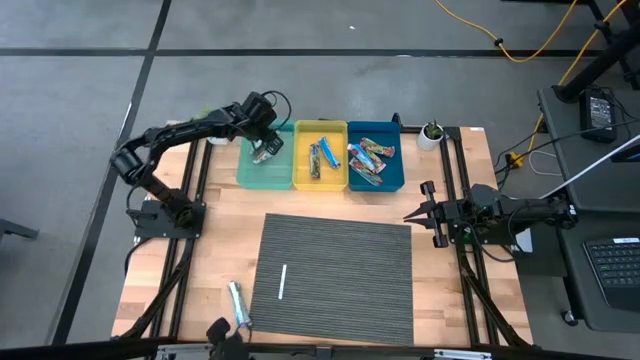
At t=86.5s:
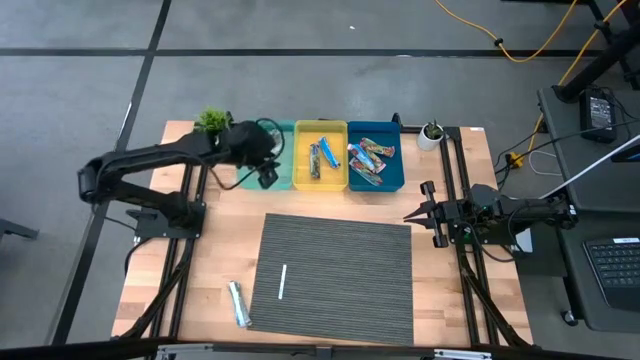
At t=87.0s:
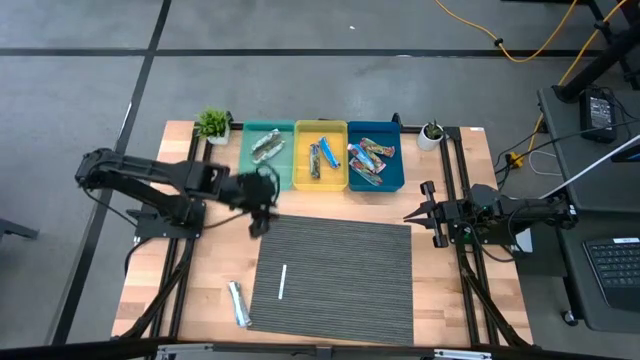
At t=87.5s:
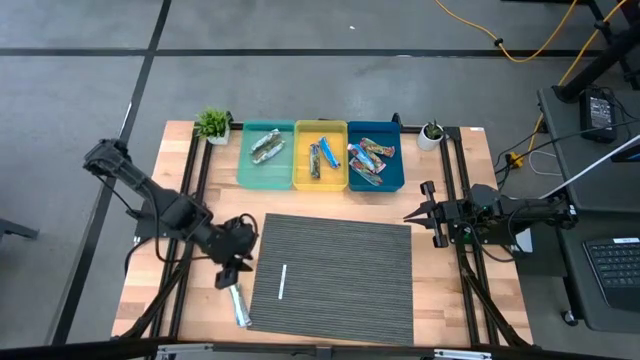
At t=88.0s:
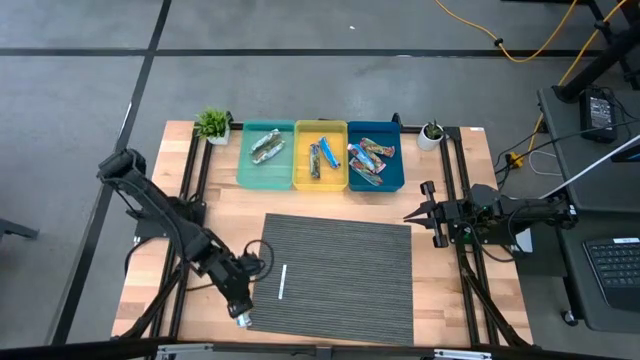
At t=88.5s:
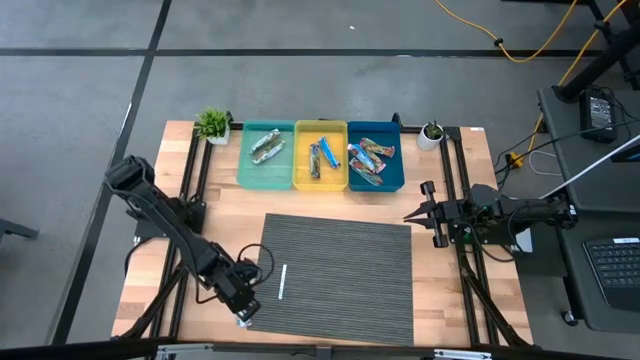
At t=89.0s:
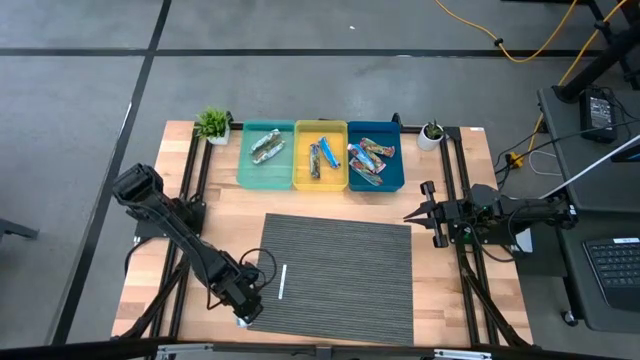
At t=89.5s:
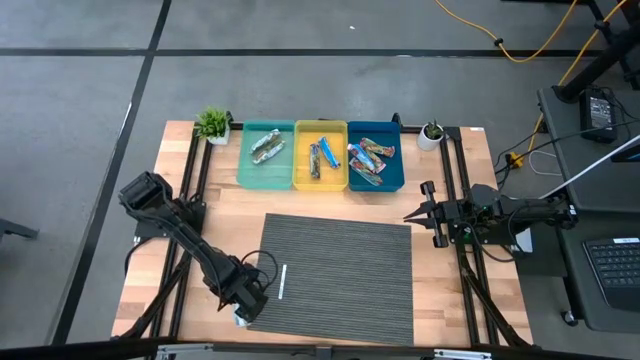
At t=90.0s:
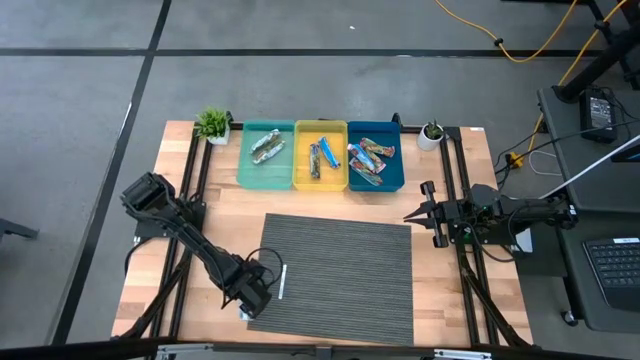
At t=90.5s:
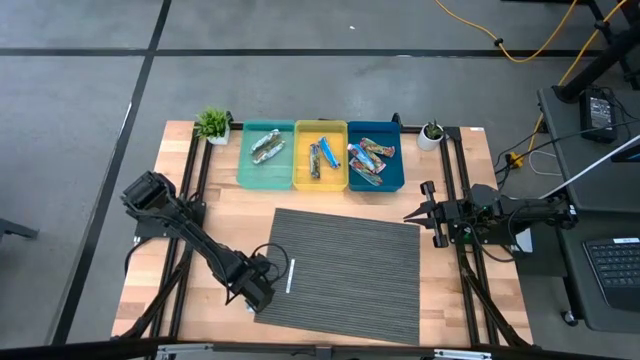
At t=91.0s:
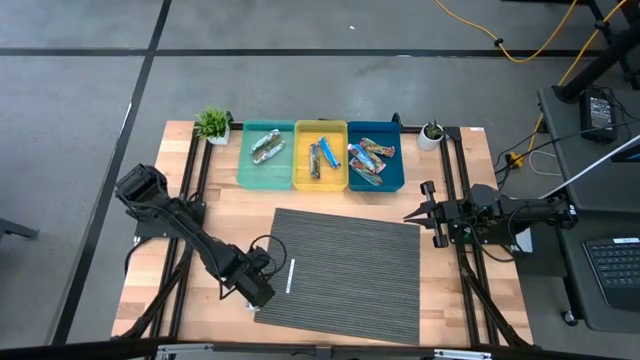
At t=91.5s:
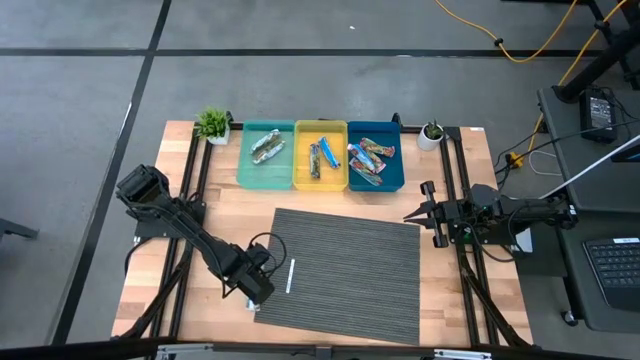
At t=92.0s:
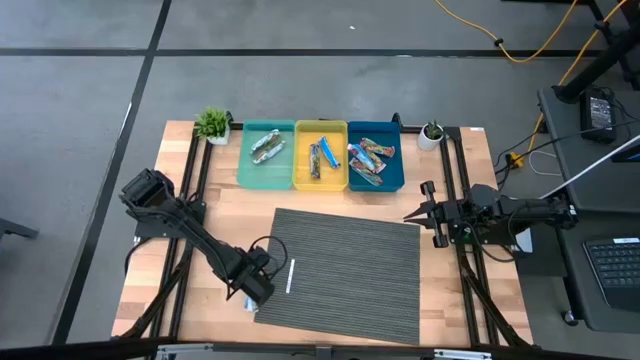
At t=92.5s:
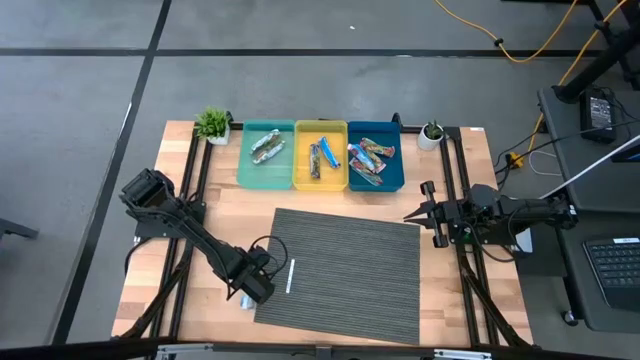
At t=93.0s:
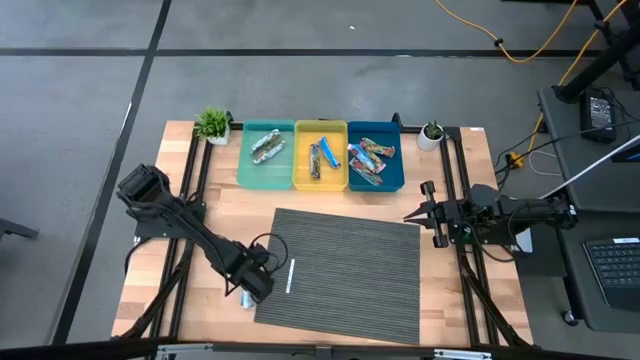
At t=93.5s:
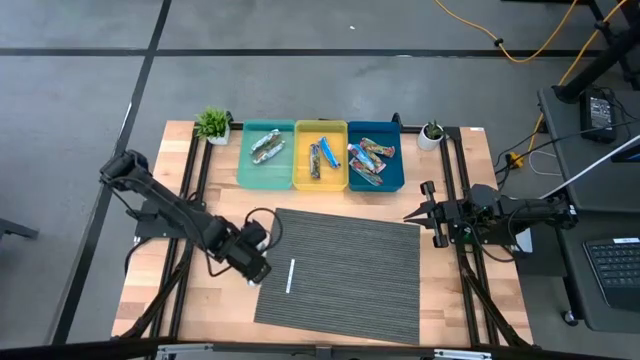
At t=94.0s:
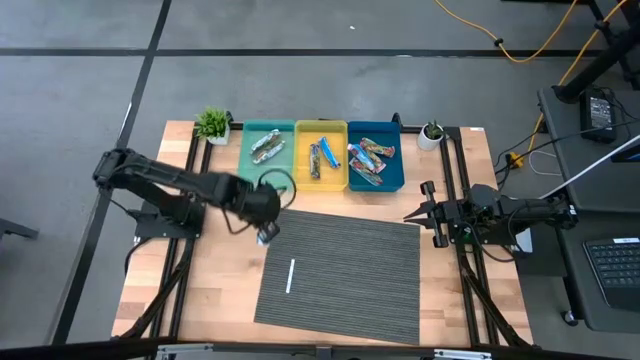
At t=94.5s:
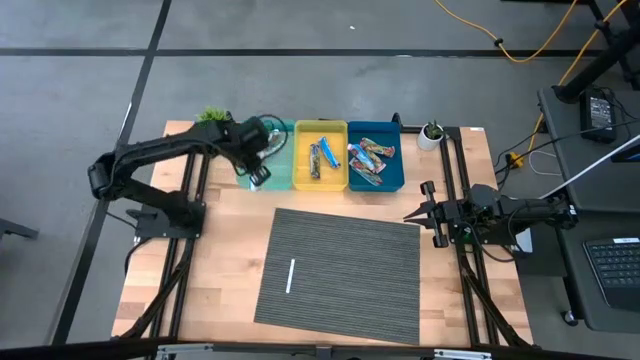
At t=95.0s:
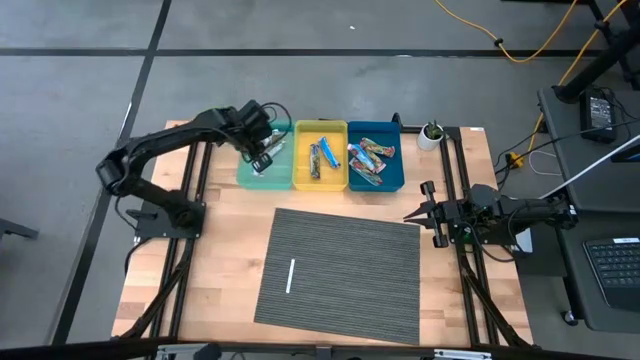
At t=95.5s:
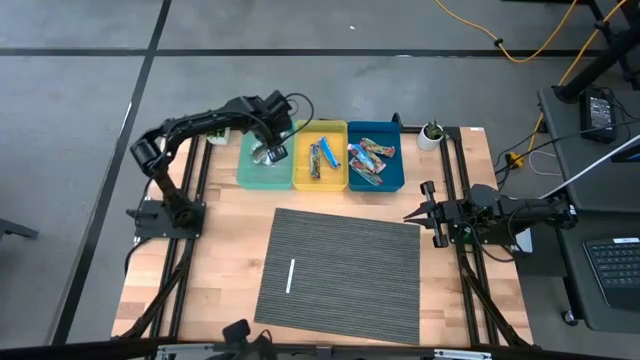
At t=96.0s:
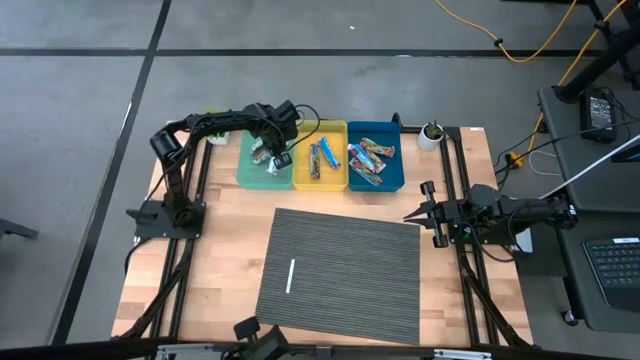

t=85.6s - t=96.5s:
Task: Pick and place Granola Bars by type
Put the yellow granola bar into the green bin

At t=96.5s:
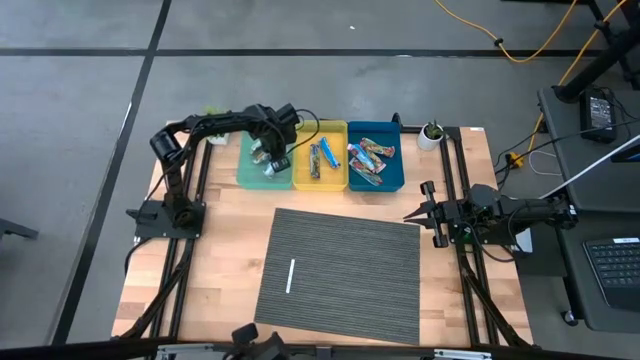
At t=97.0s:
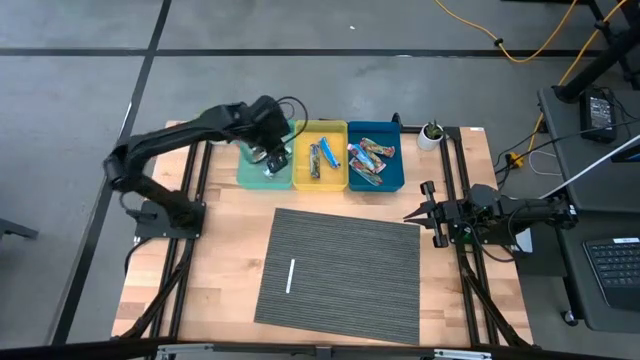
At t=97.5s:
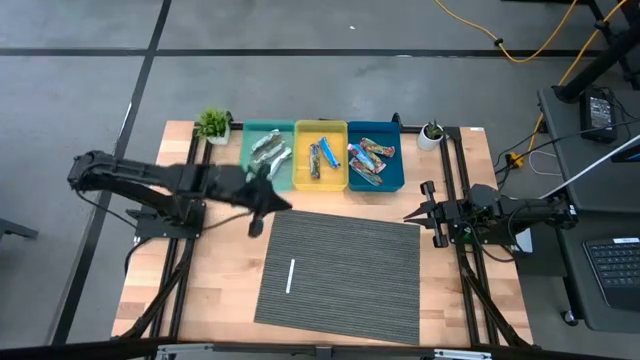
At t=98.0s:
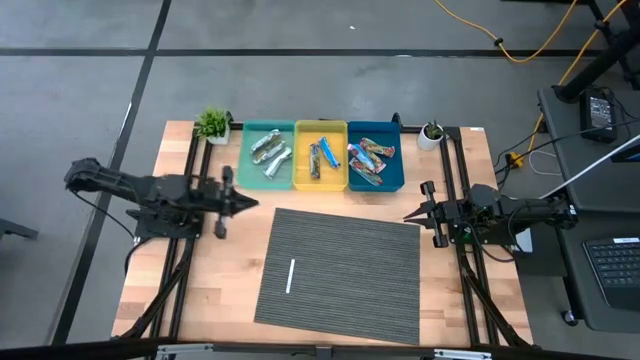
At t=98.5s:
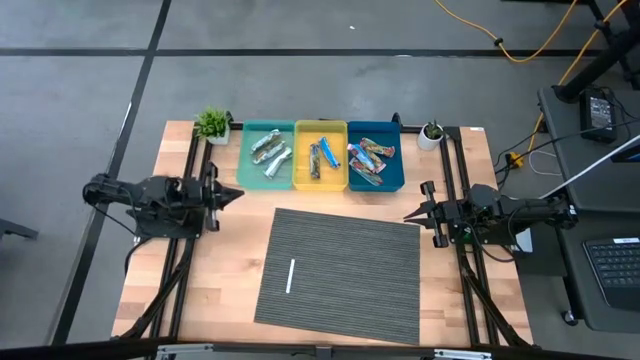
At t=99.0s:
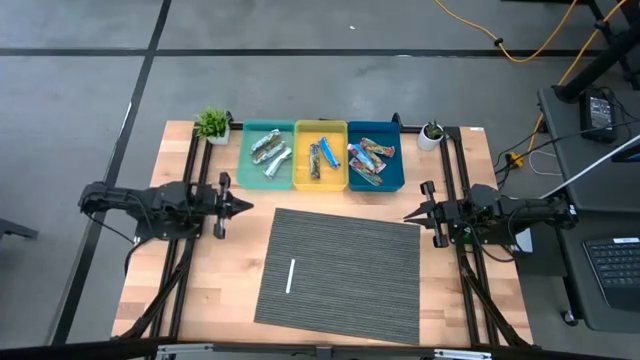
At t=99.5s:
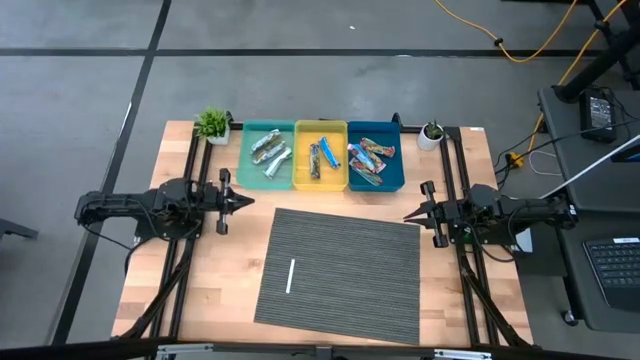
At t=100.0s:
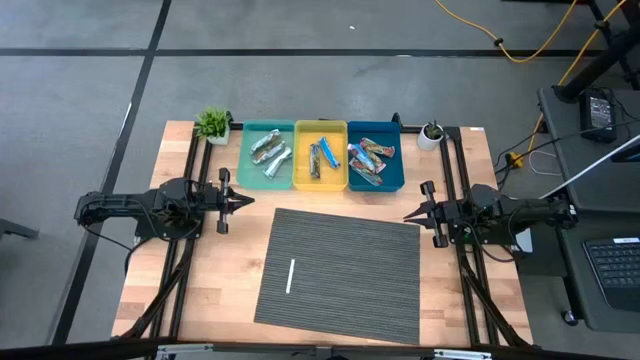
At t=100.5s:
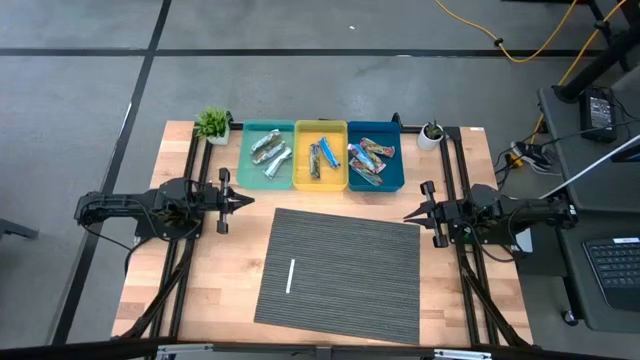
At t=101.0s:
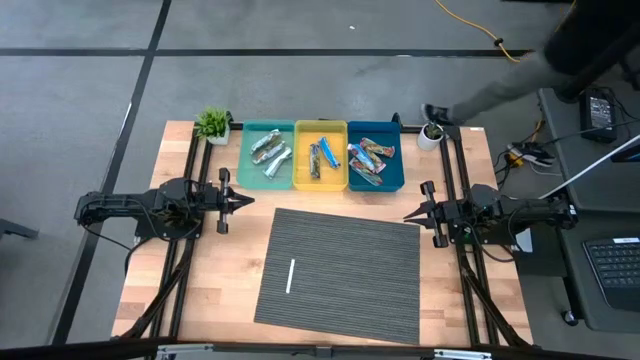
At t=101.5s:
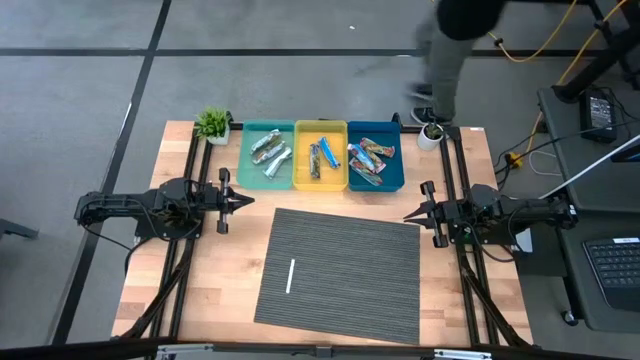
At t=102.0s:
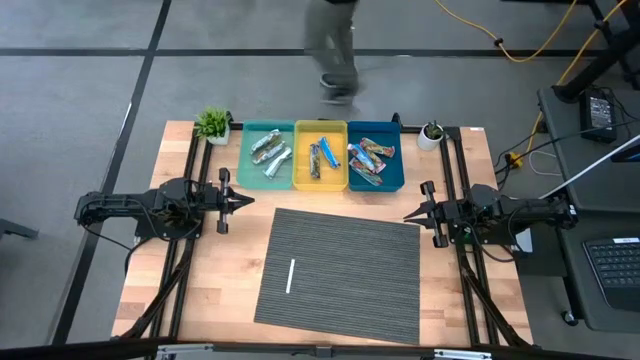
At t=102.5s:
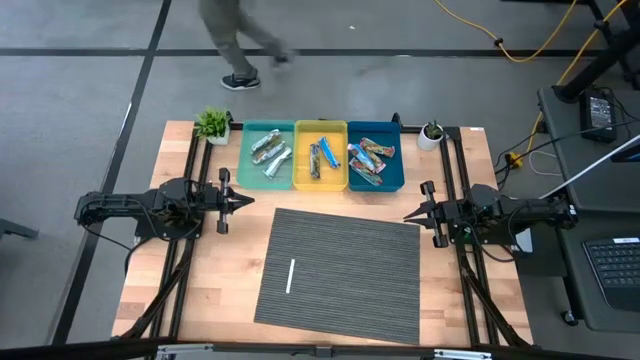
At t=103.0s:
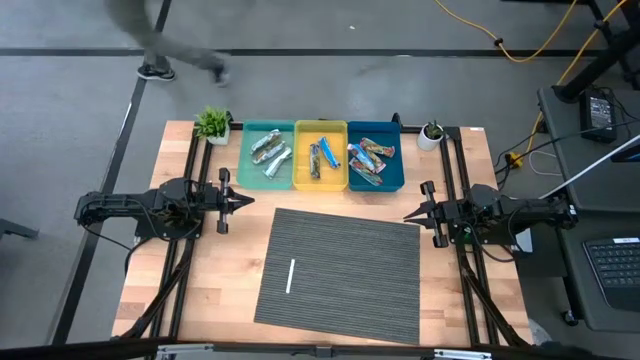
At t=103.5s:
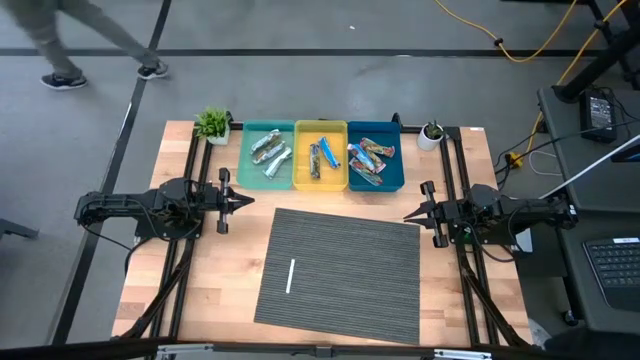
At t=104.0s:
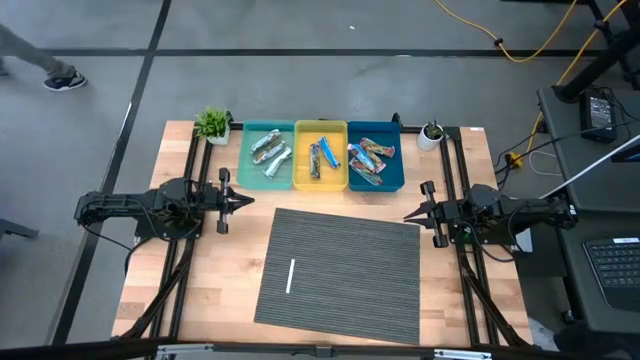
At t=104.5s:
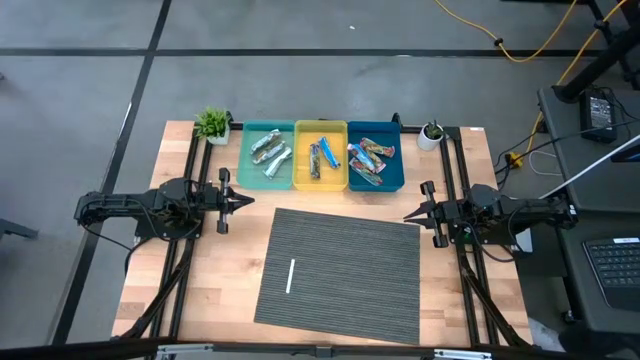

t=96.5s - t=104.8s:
Return to Home Position

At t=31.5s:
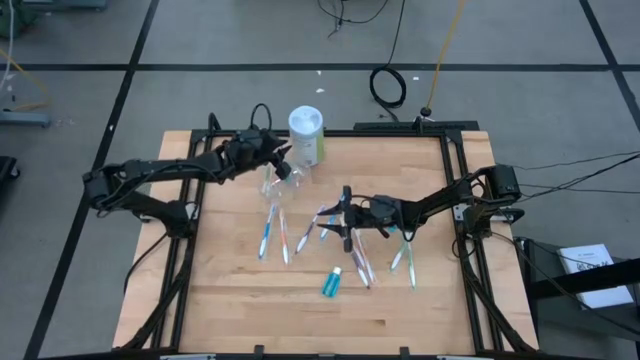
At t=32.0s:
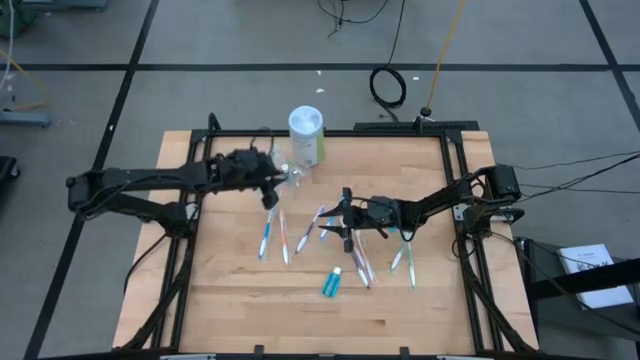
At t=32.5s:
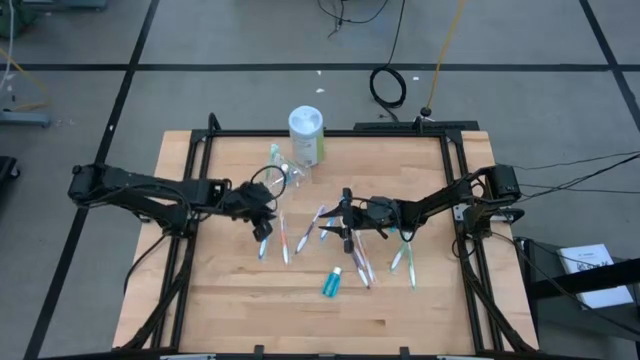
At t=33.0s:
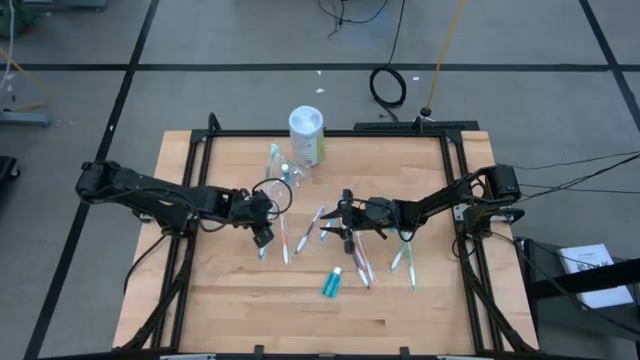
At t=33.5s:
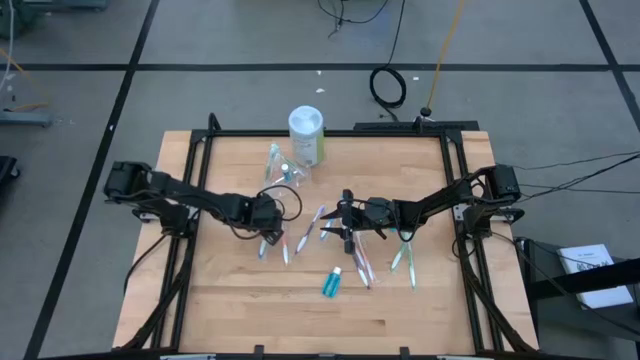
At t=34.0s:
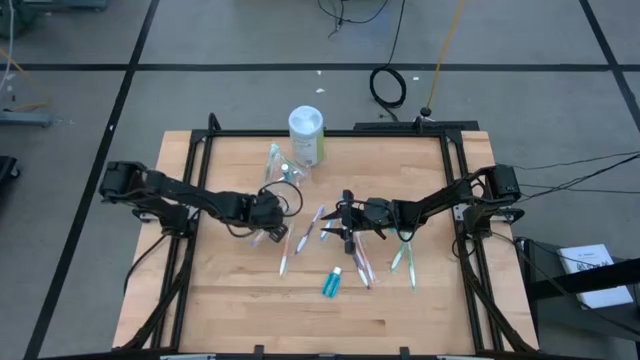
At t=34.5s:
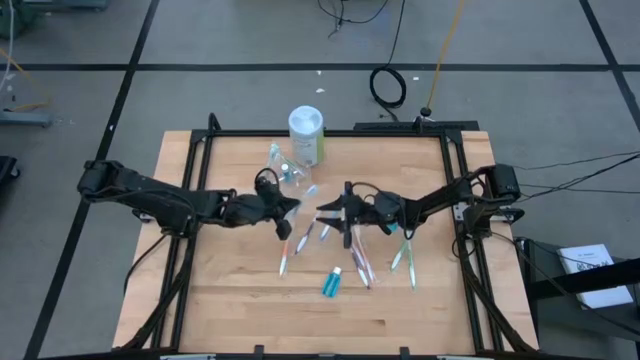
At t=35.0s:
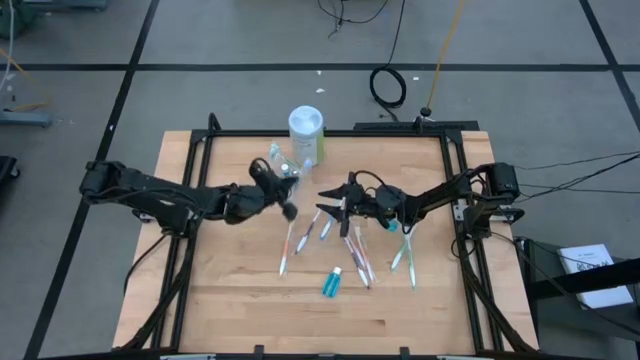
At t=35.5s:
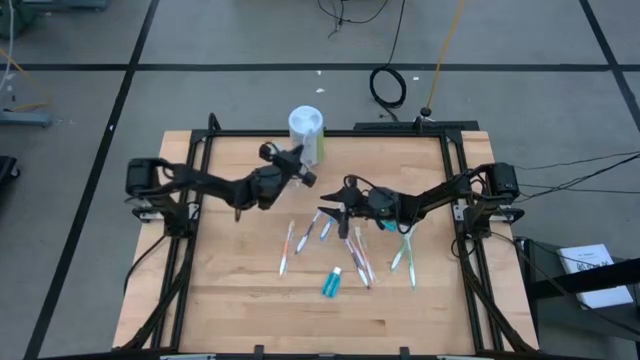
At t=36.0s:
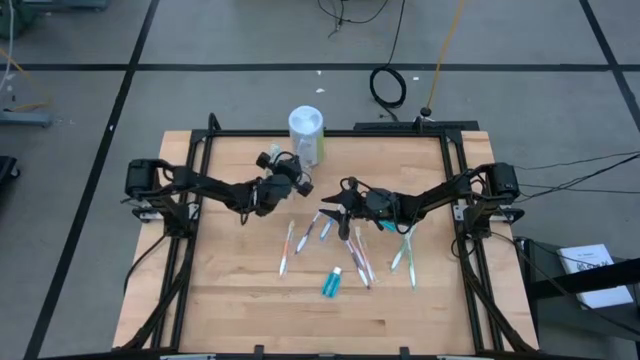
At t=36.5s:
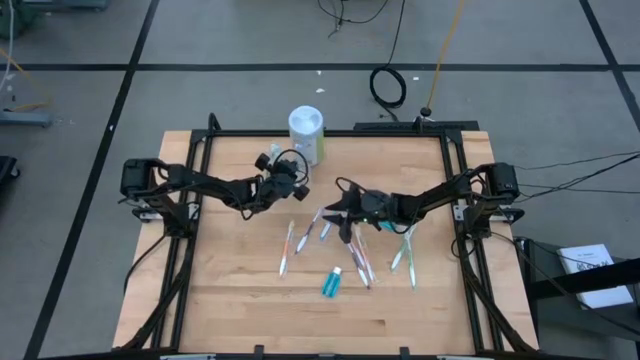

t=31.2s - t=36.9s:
Task: Pick & Place toothbrushing station
Put the left blue toothbrush into the transparent organizer
